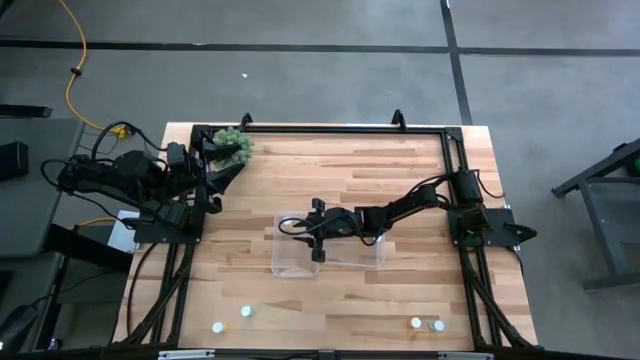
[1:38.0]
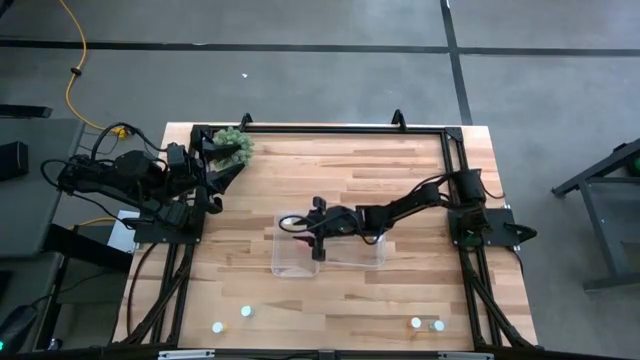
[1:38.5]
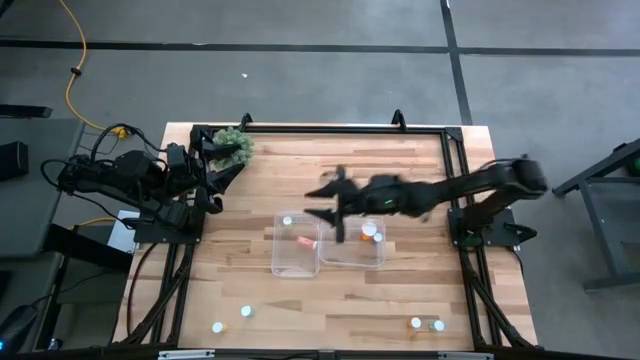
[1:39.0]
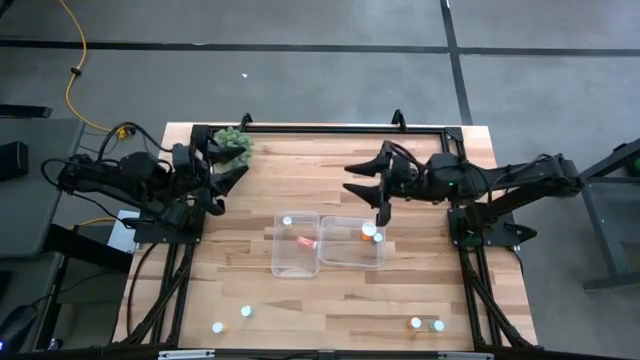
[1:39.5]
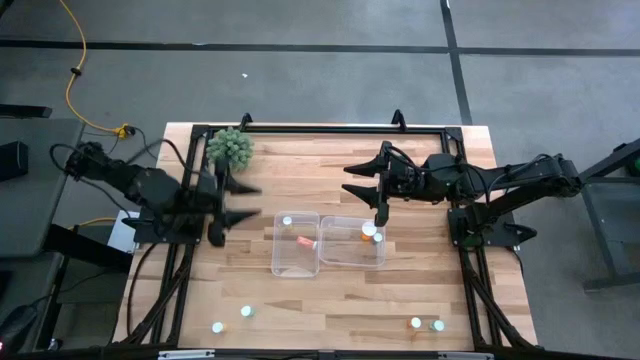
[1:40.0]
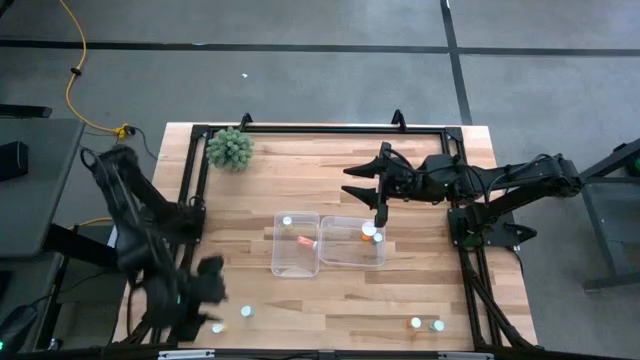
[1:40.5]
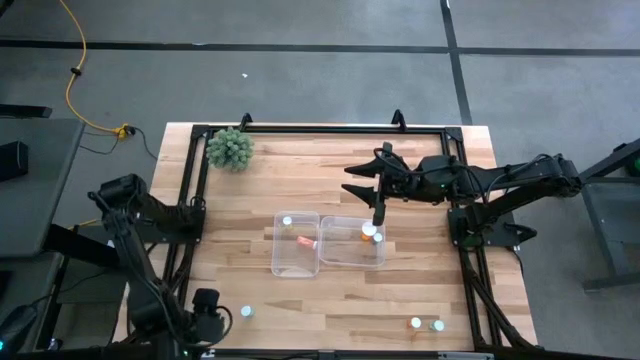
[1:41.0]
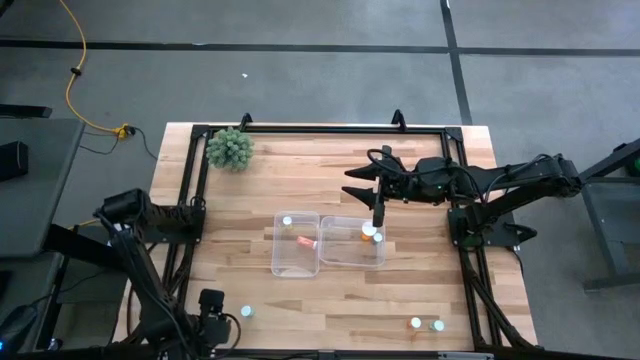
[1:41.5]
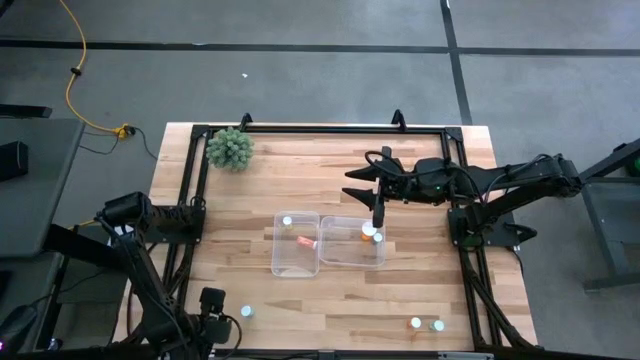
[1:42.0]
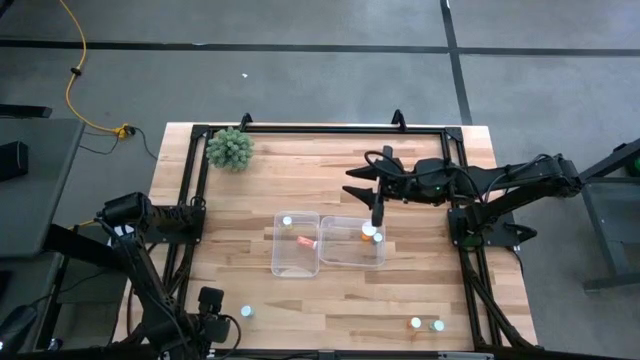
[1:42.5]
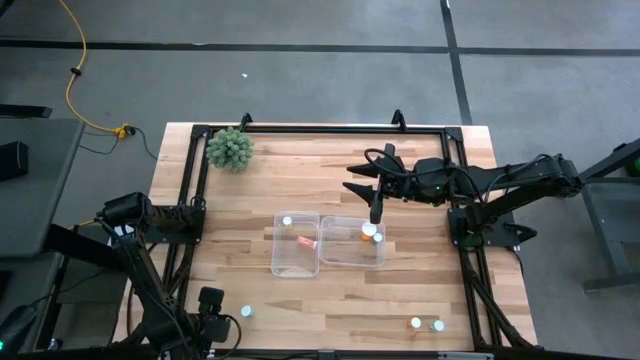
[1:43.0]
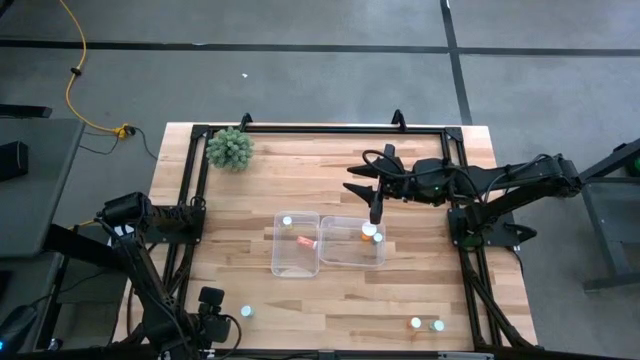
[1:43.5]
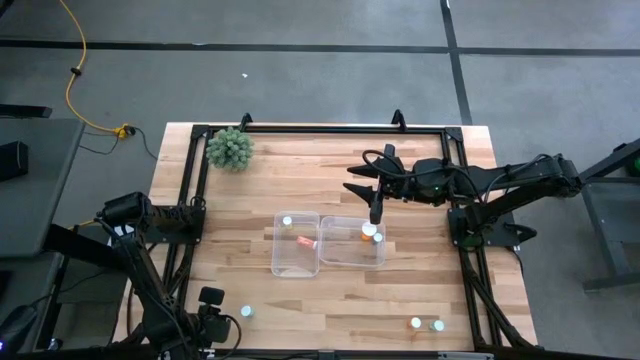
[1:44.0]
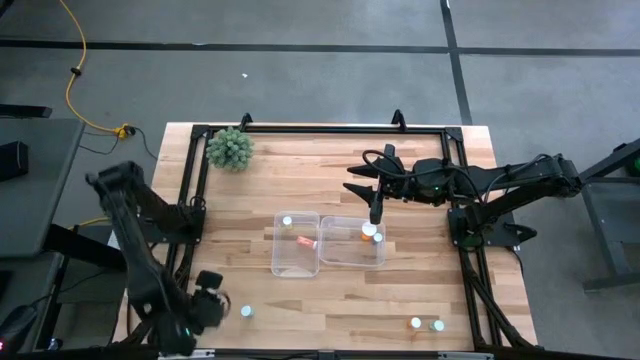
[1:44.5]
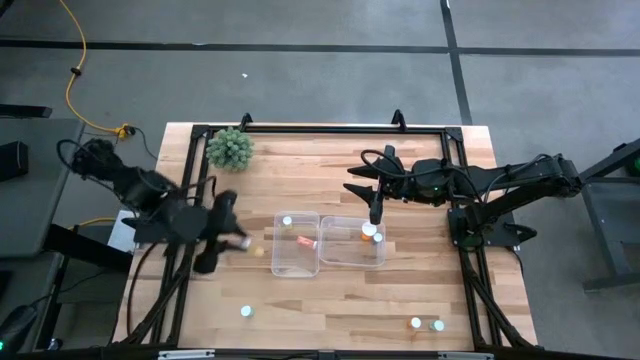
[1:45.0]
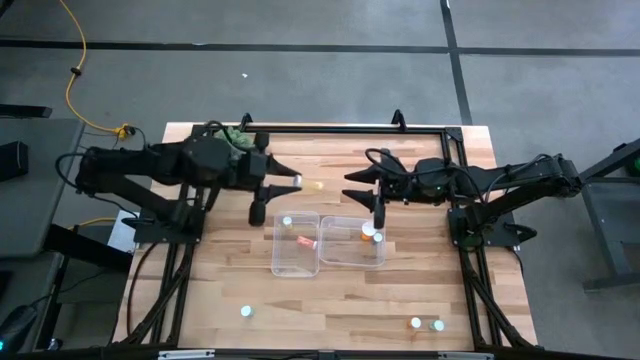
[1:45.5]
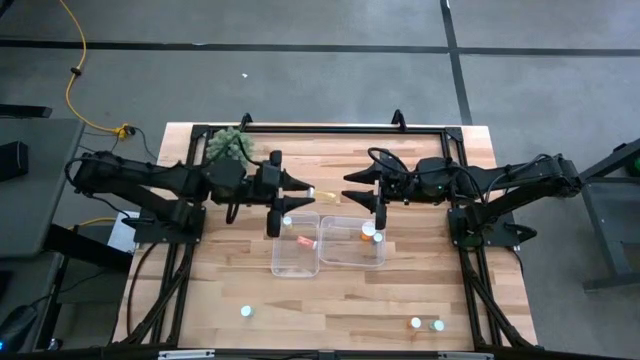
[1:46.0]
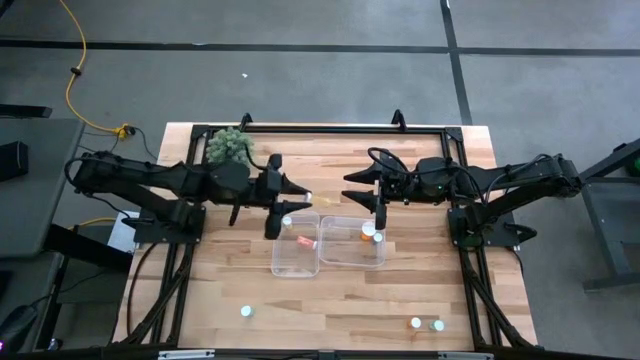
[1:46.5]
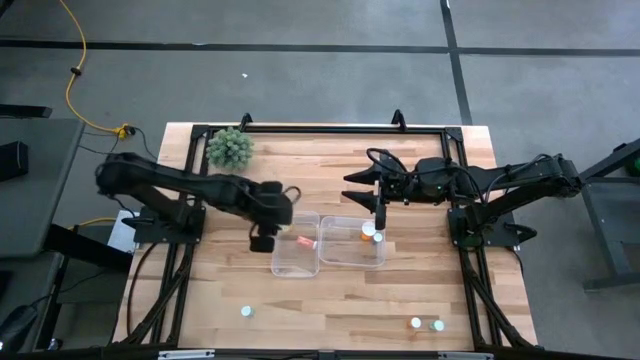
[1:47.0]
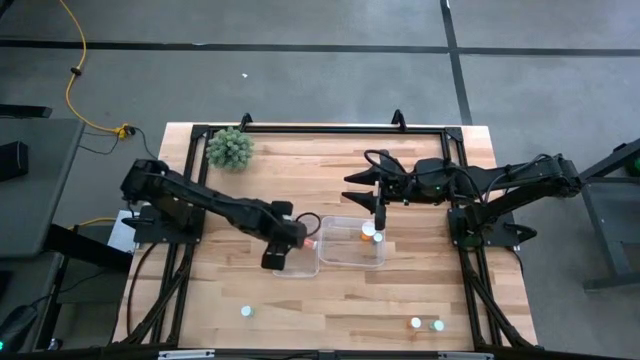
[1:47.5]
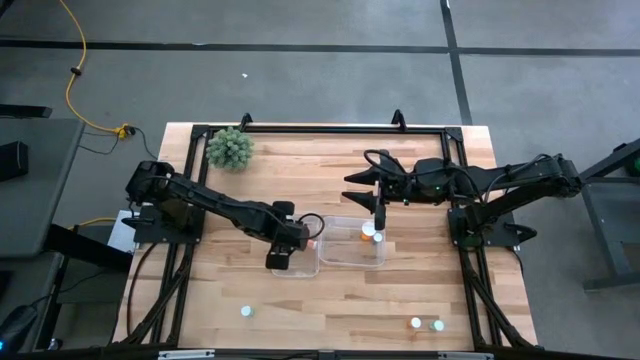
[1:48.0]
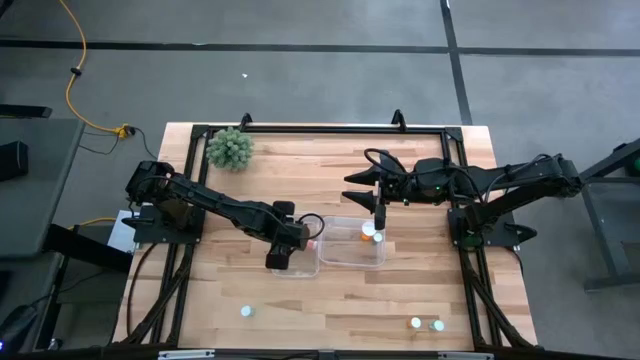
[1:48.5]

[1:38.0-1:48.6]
Task: Pick and place medicine bottles into bin by pill shape (circle, oval)
Put the yellow pill bottle into the left transparent bin

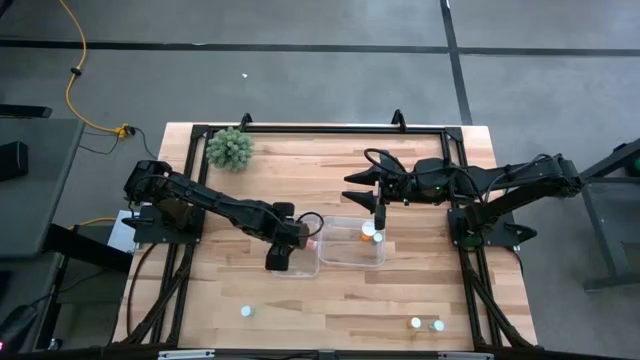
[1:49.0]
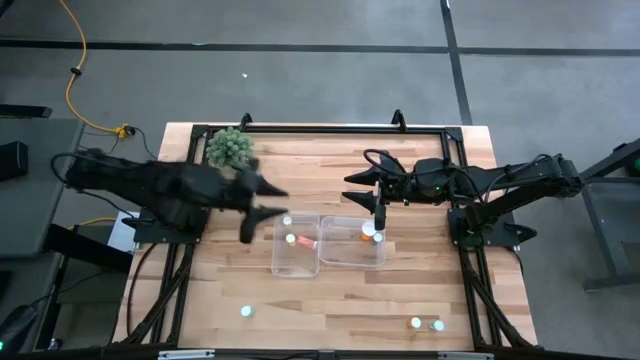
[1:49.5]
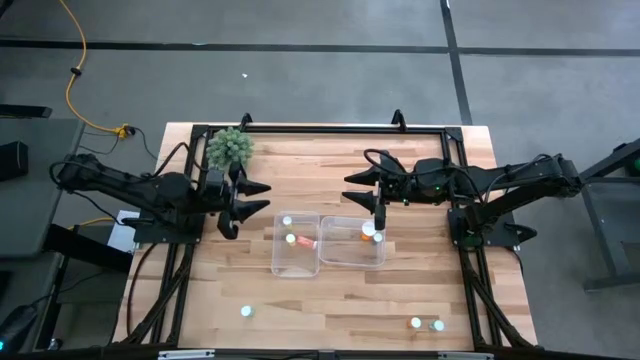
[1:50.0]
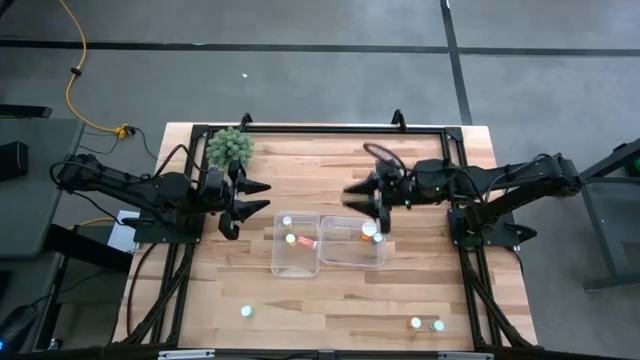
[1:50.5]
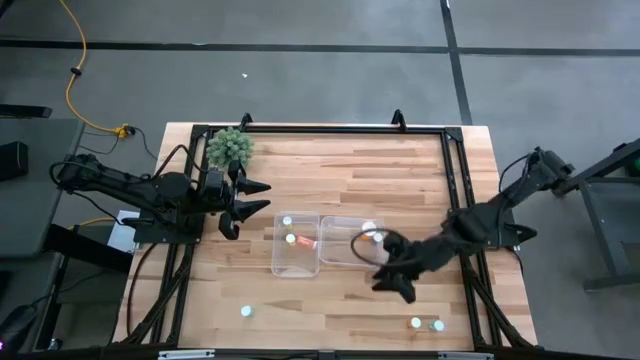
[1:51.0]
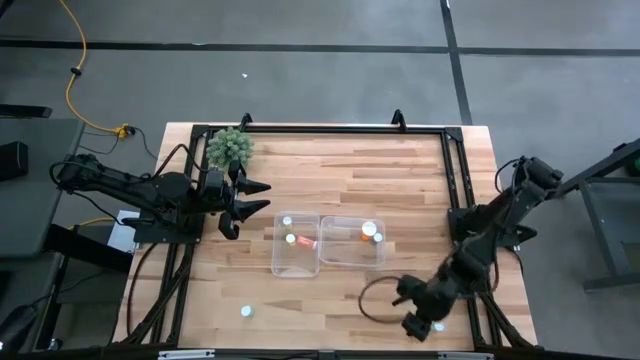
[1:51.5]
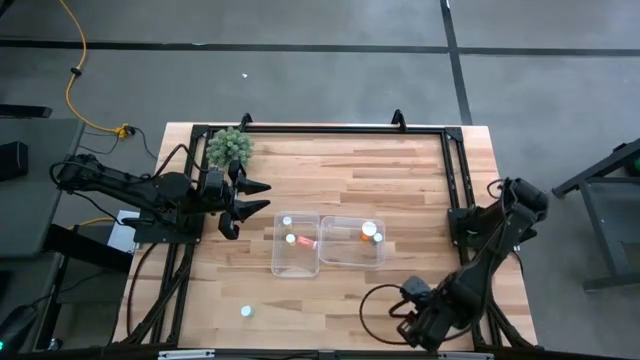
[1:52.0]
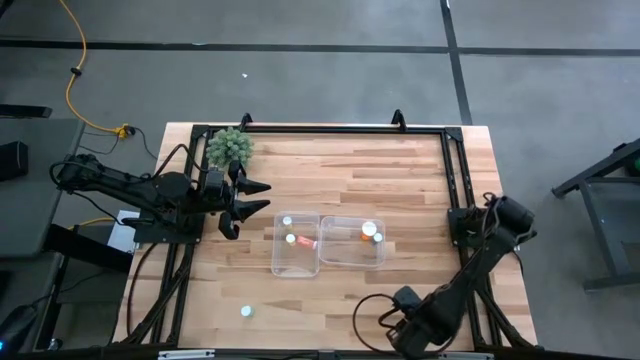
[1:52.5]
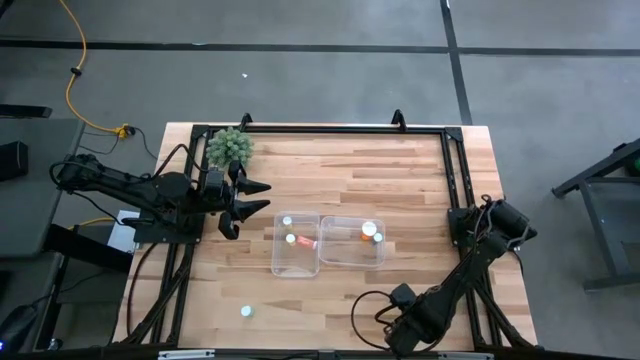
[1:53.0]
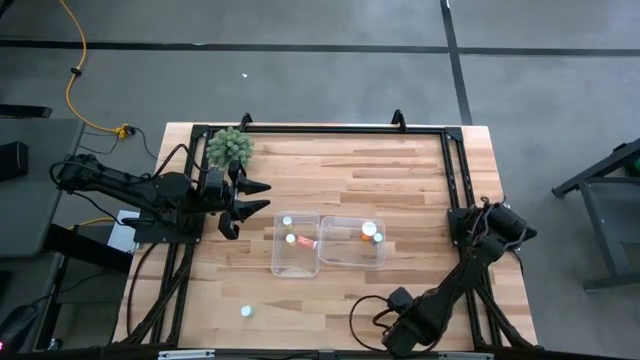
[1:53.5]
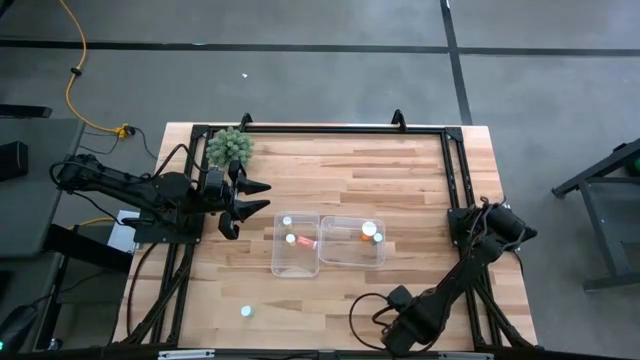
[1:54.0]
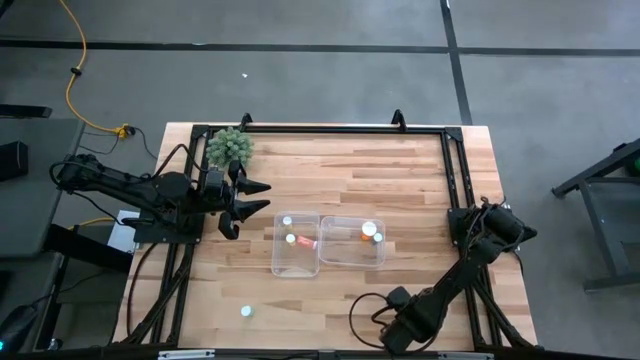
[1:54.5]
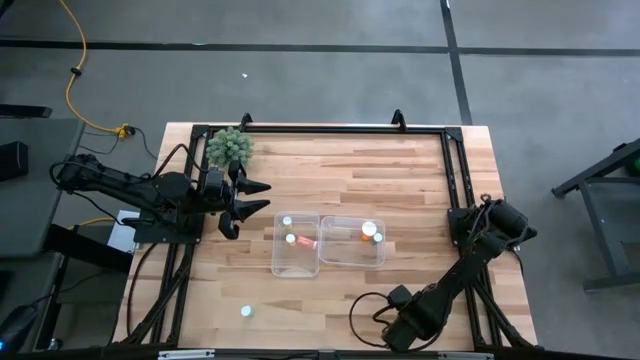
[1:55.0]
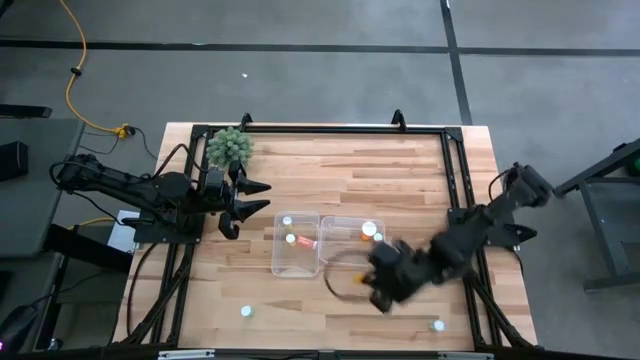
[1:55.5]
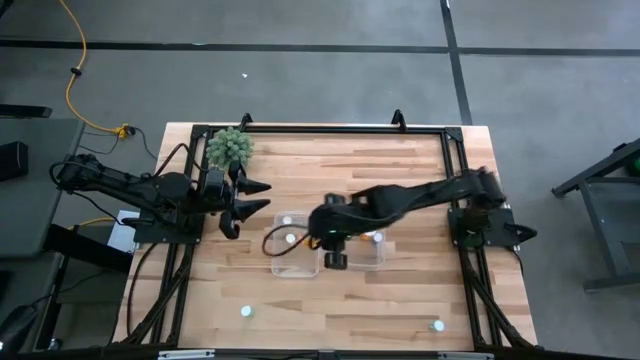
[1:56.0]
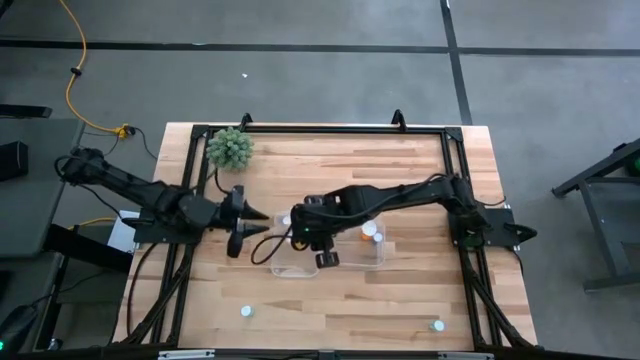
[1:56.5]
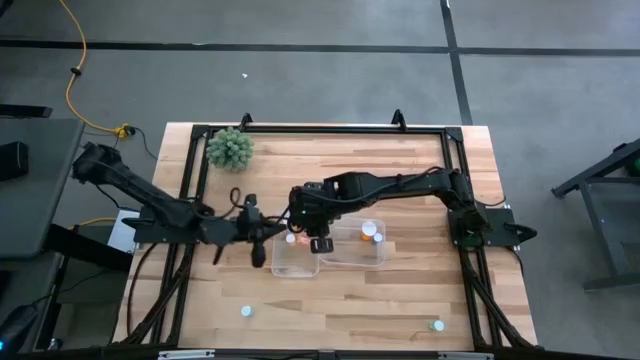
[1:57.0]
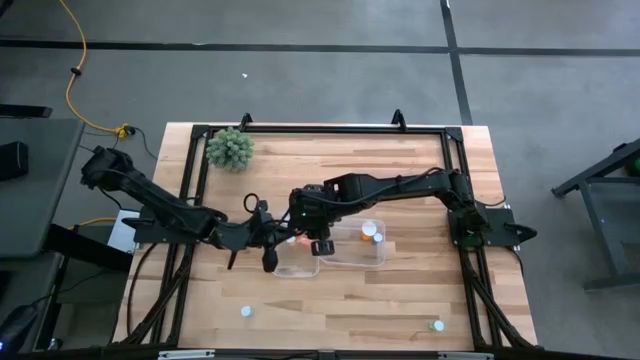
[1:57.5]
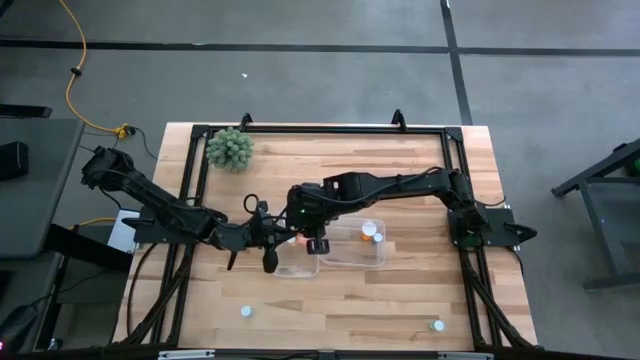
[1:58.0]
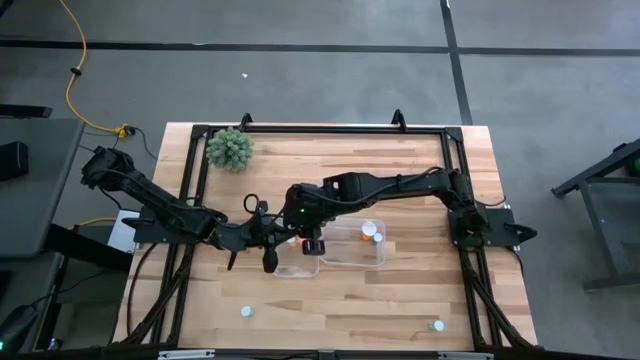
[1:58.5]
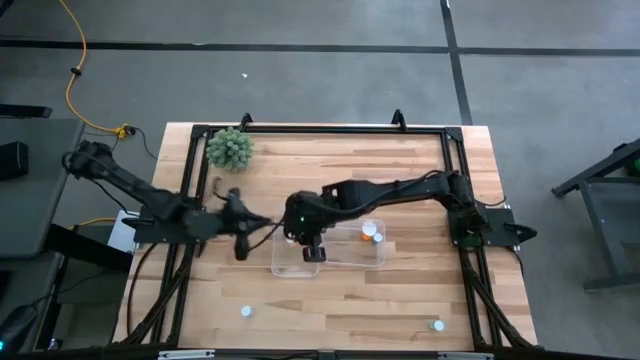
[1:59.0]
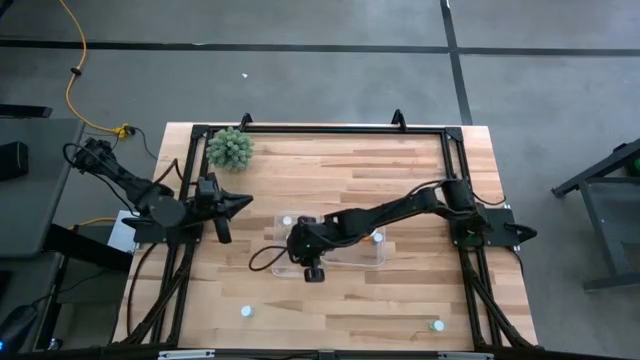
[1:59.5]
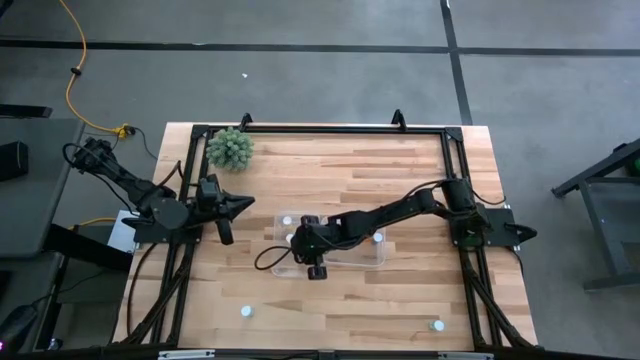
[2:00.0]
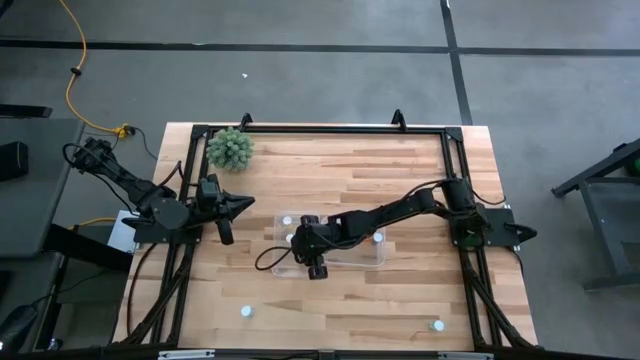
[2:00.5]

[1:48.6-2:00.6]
Put the small orange pill bottle into the left transparent bin
